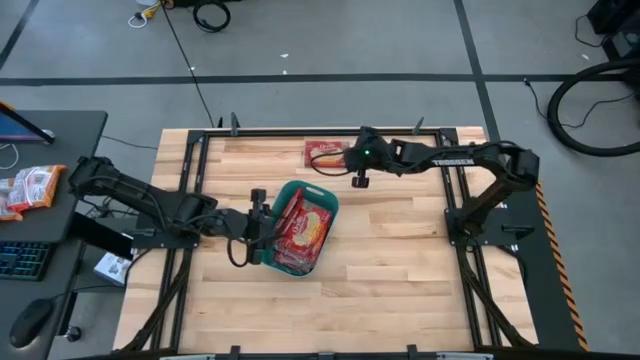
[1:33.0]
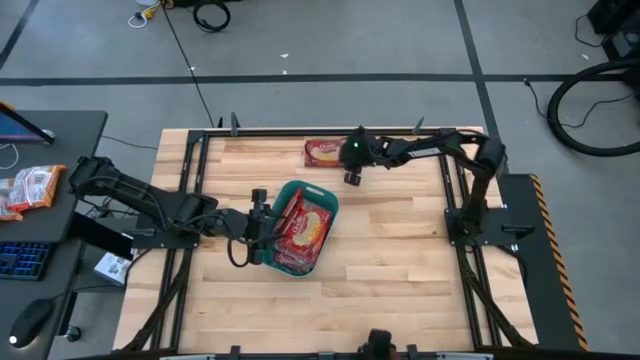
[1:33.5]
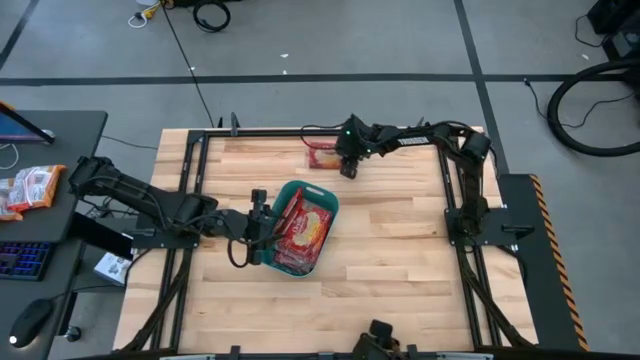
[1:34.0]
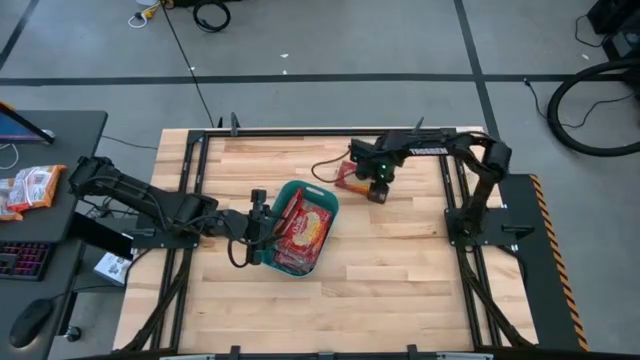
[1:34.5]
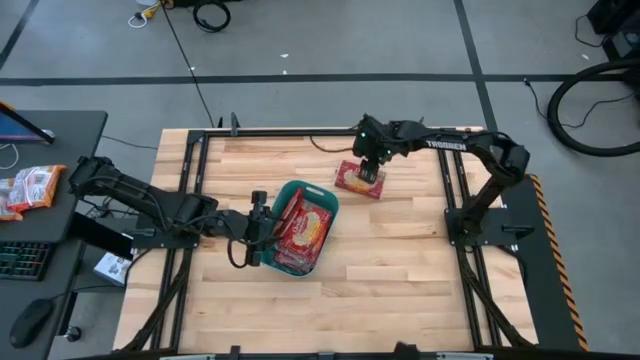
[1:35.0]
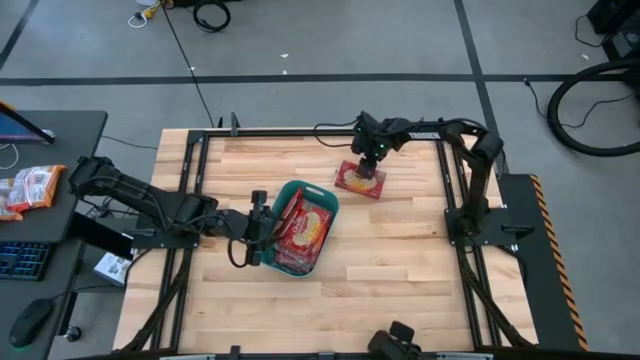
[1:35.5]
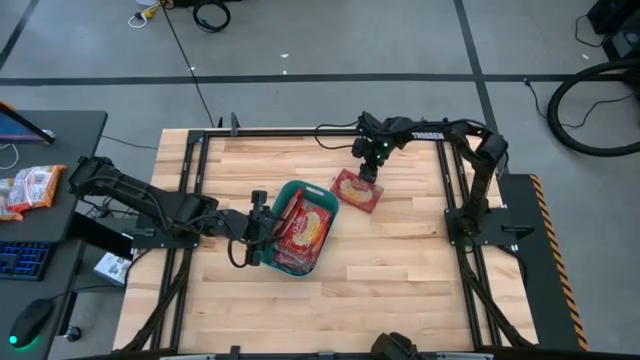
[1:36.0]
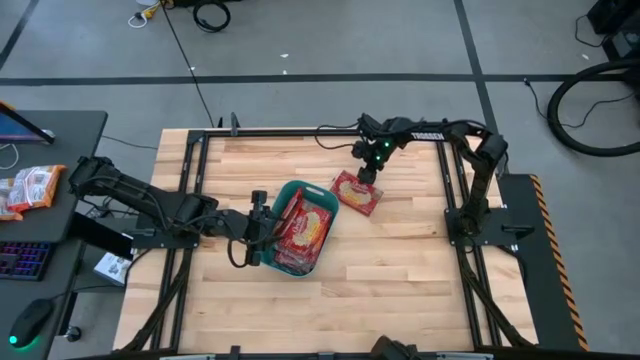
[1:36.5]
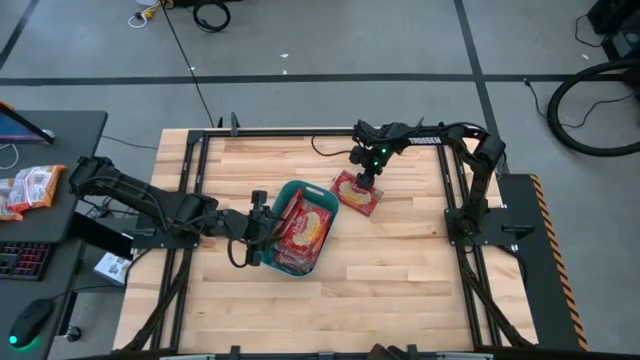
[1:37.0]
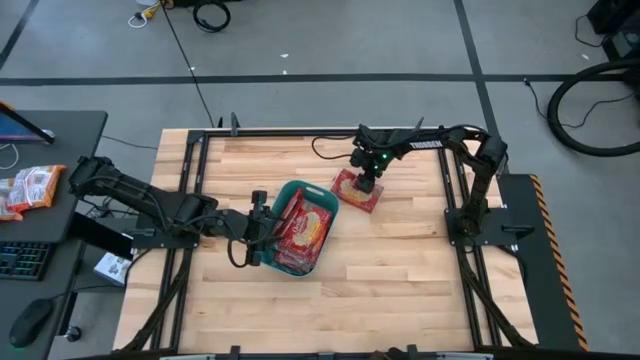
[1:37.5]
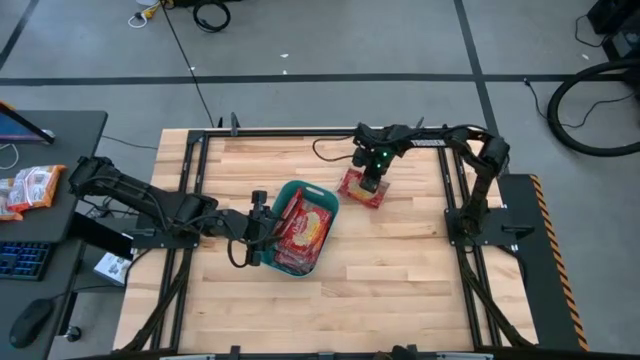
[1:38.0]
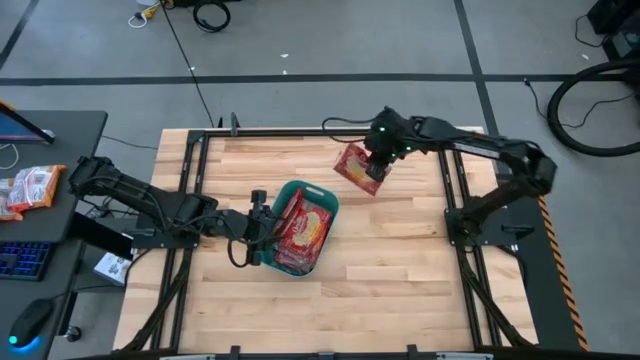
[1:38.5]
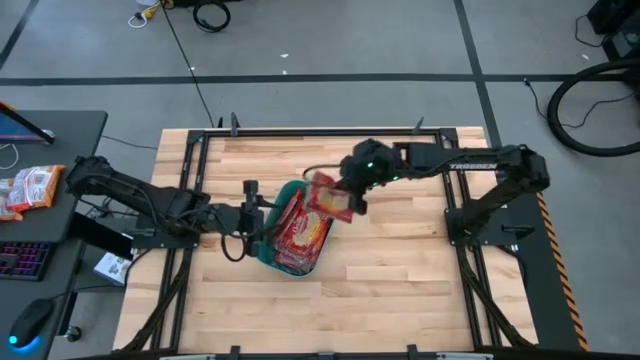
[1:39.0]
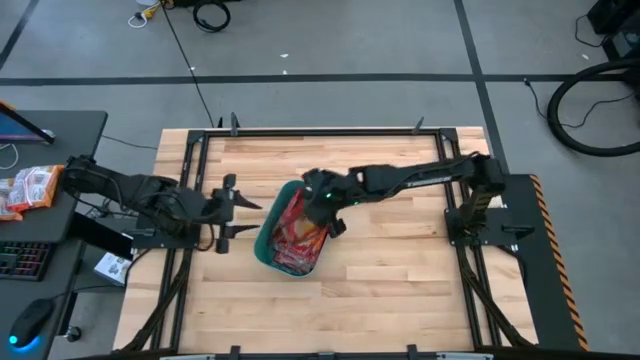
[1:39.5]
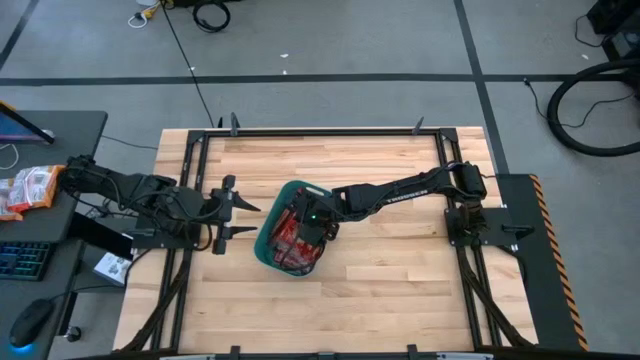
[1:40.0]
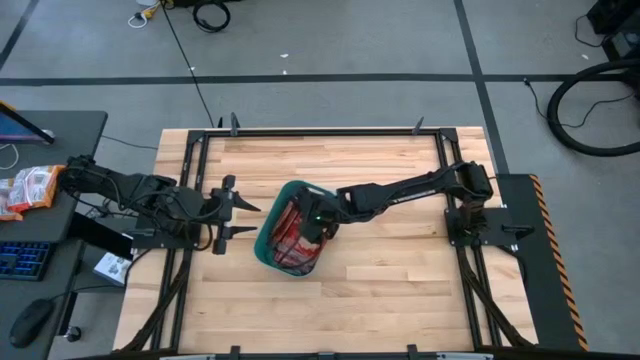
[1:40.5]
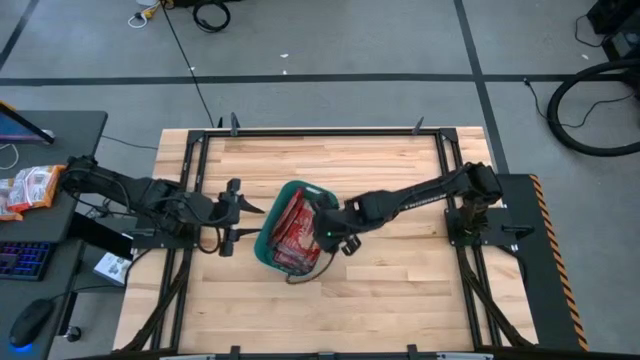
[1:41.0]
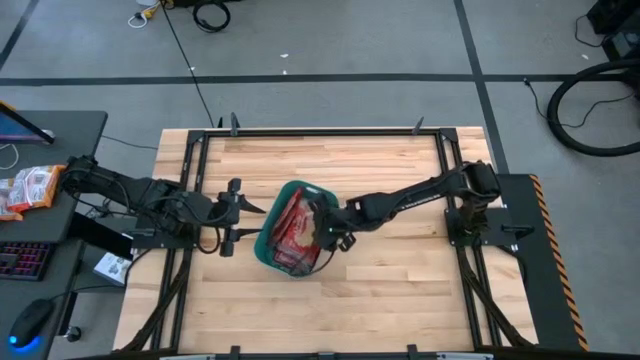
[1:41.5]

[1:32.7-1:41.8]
Task: Sort popcorn bags into baskets
Put the red popcorn bag into the green bin

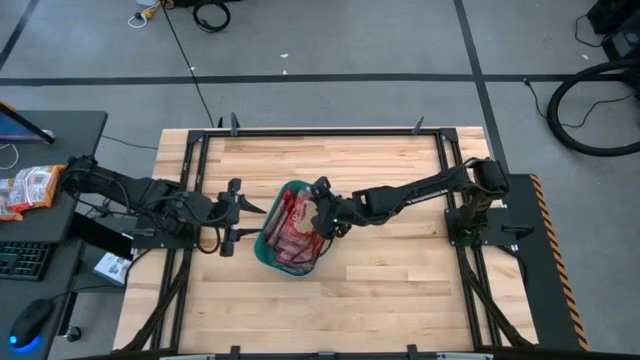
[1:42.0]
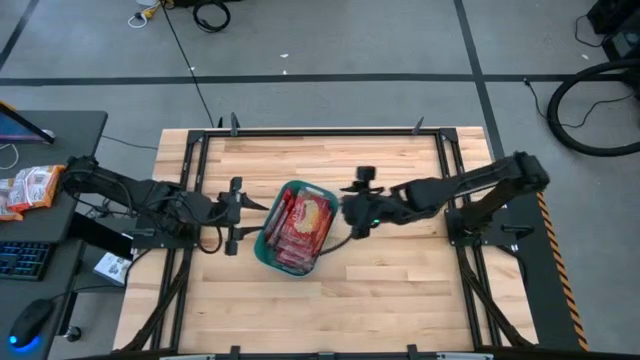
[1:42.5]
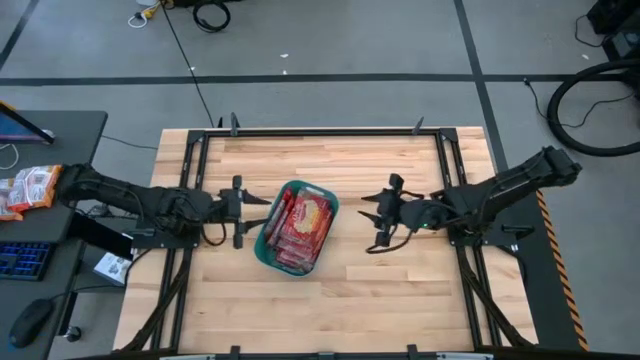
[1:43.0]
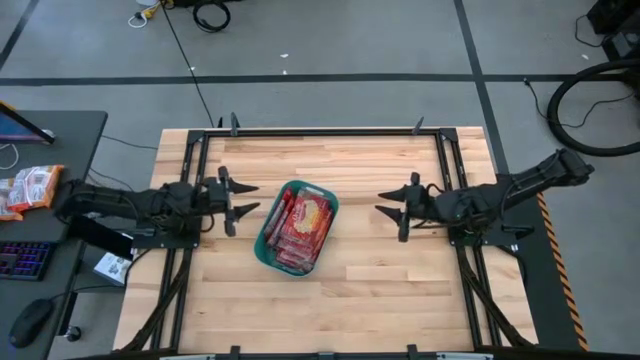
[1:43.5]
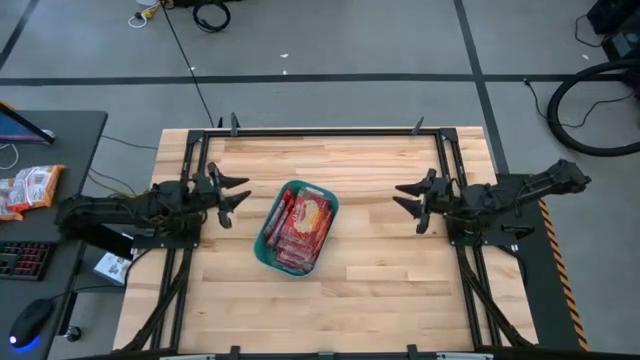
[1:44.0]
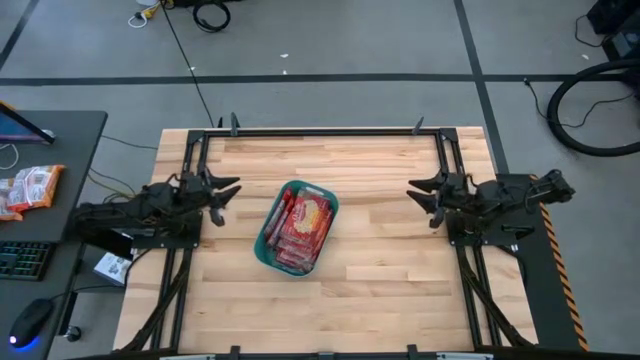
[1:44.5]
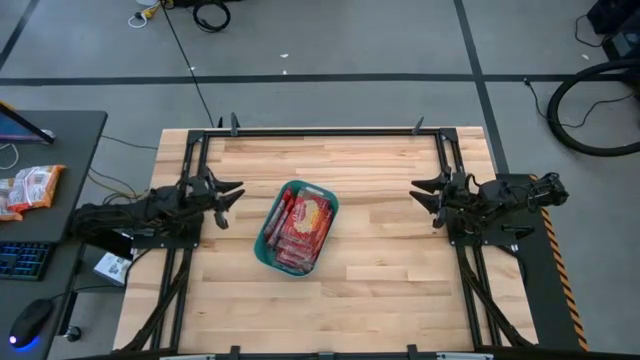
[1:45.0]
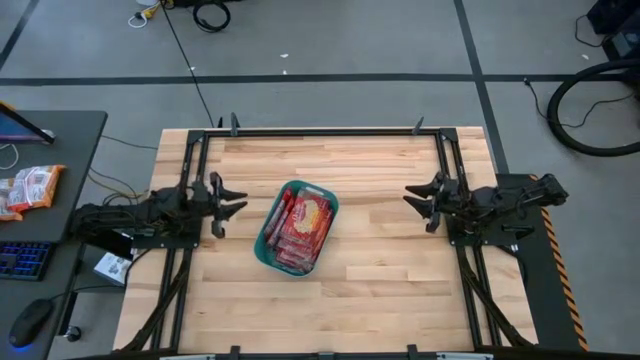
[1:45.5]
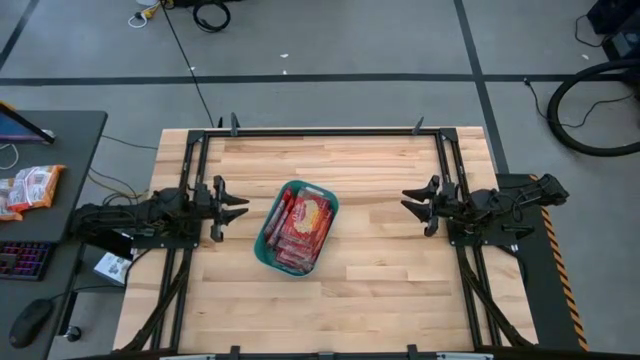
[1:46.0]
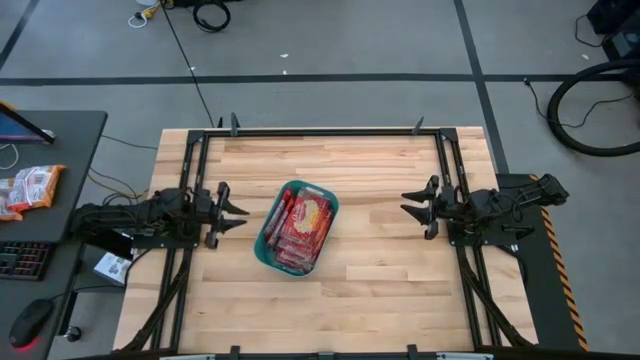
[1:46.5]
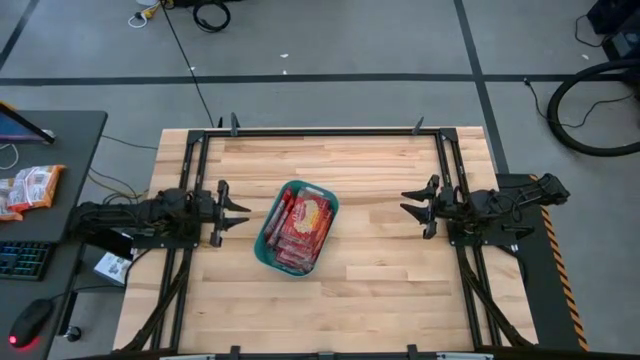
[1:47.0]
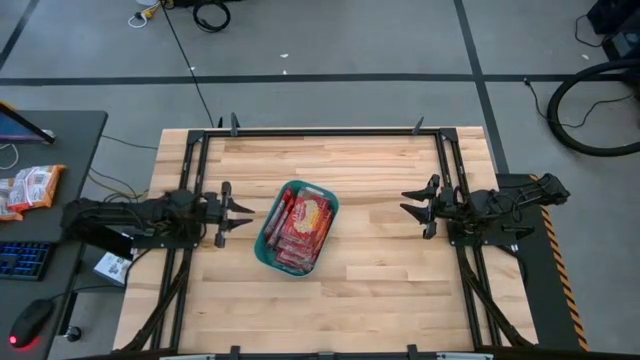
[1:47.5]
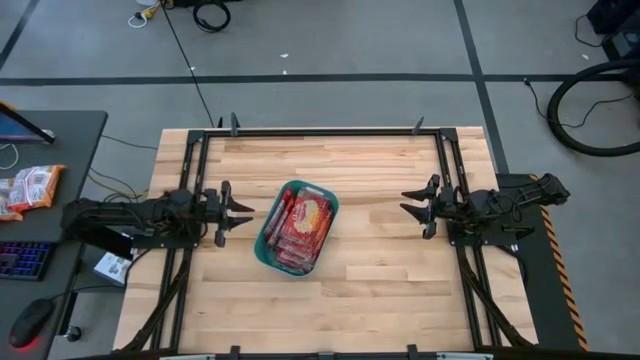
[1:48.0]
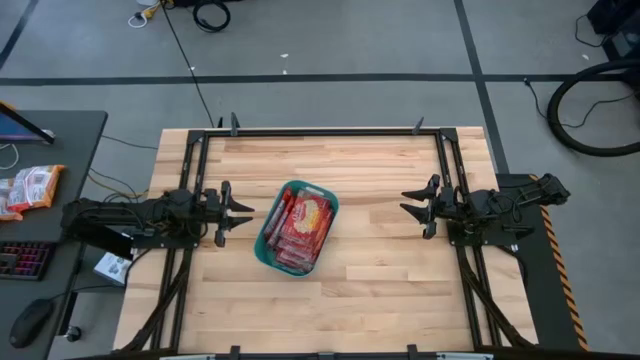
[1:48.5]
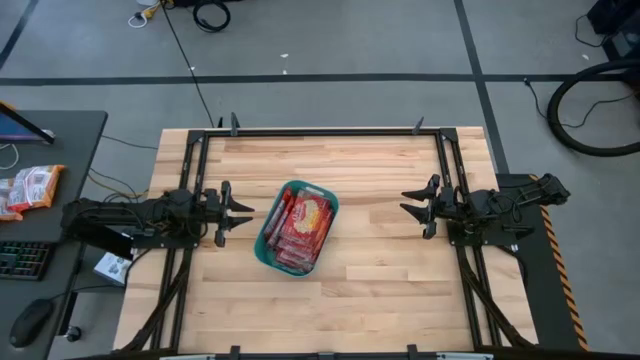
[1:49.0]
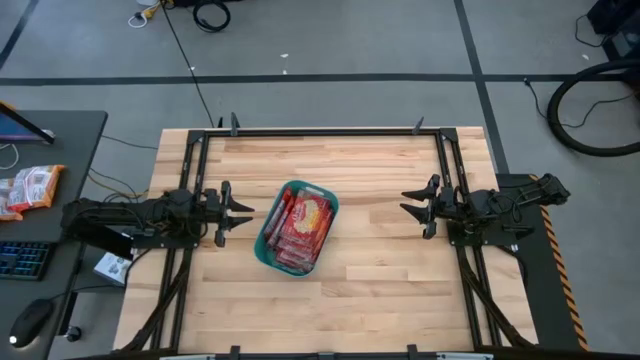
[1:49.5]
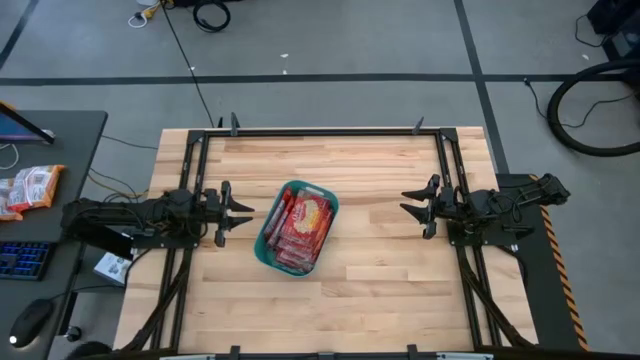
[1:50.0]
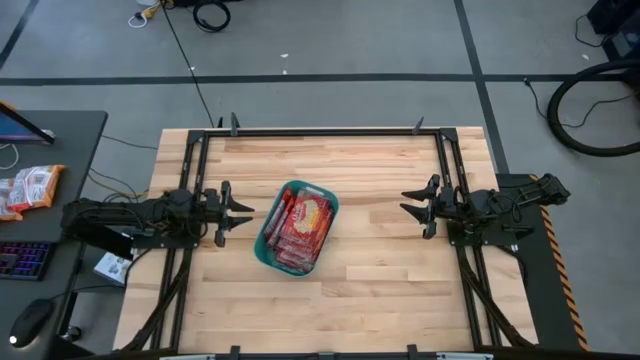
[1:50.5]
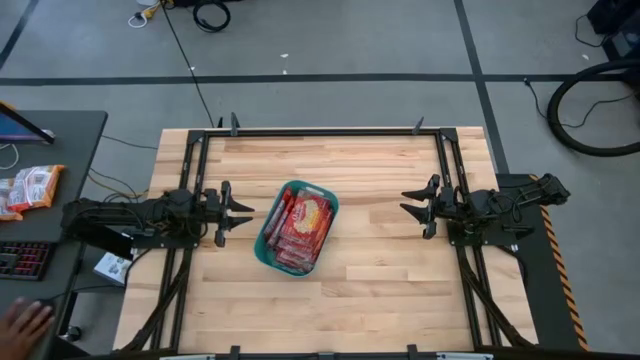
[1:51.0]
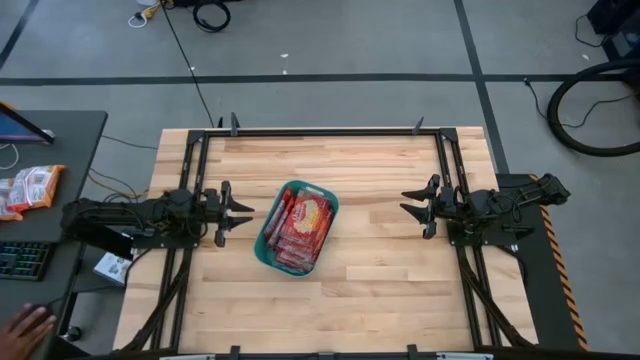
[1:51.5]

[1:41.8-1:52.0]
Return to Home Position

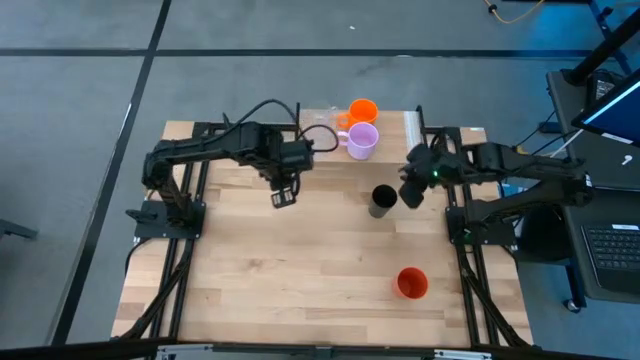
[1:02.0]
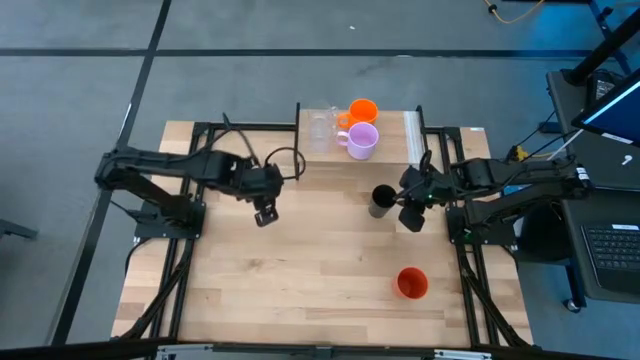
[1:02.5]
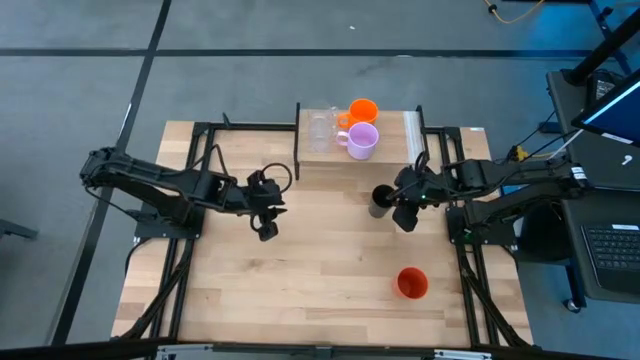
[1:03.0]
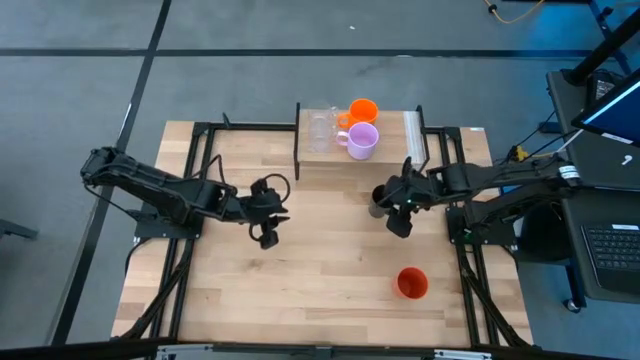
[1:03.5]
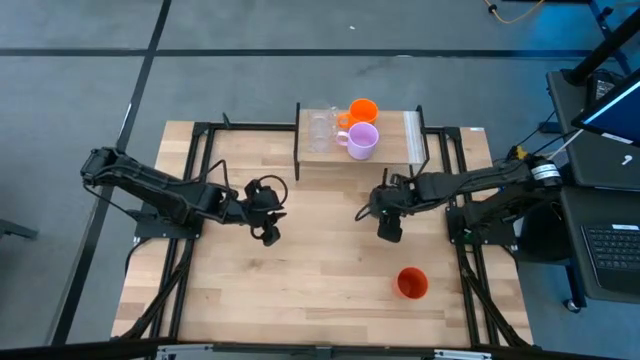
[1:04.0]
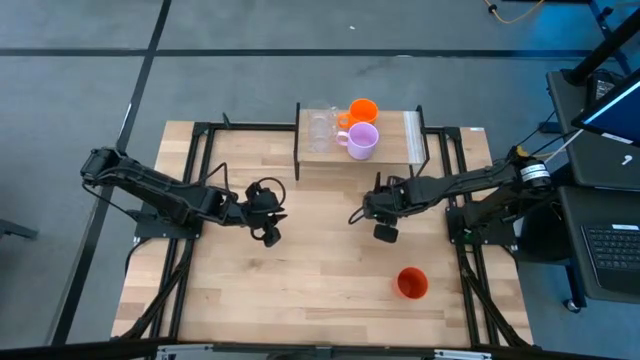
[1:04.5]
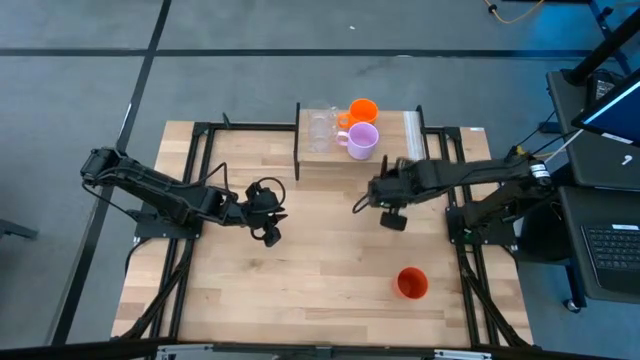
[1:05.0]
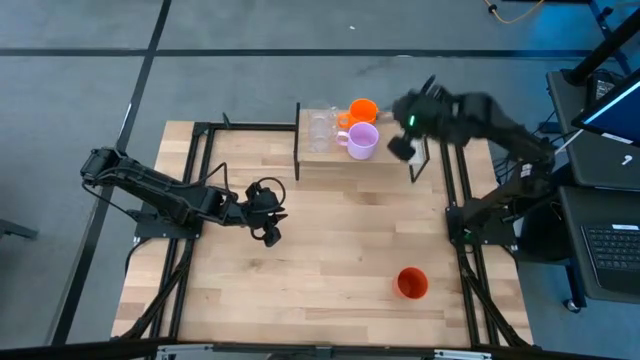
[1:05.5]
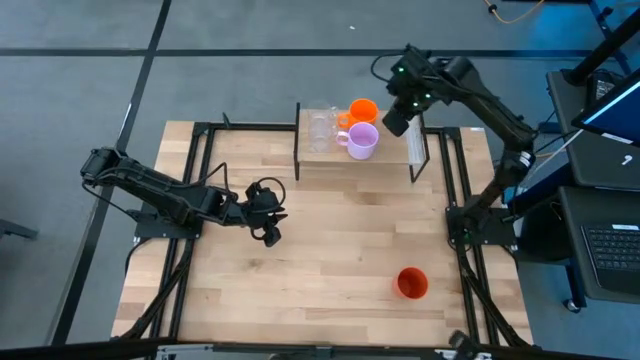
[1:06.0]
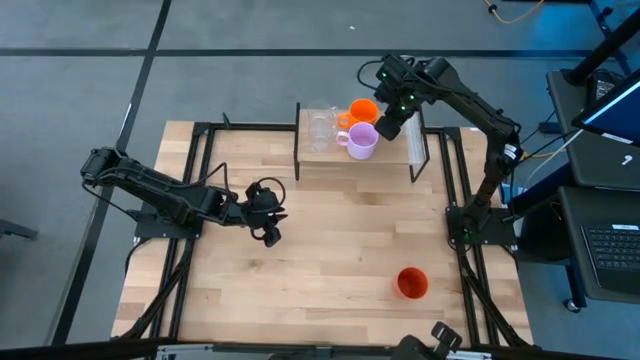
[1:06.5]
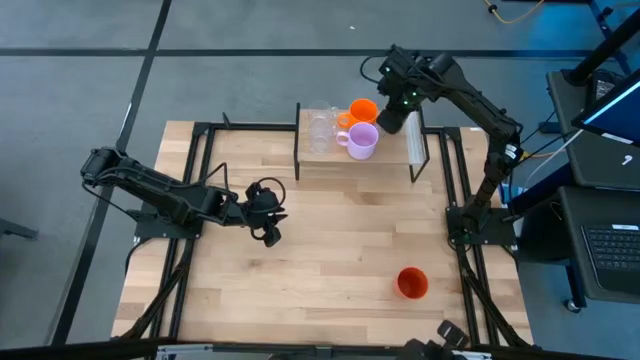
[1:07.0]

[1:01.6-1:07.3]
Task: Stack small to large cups/mugs on shelf
Put the black cup on the shelf
